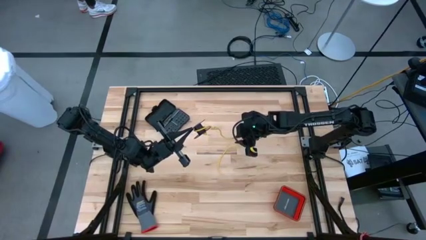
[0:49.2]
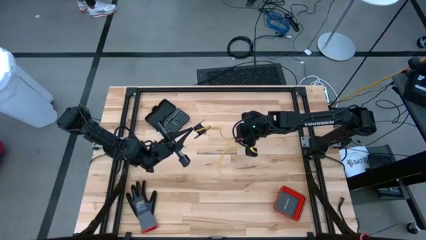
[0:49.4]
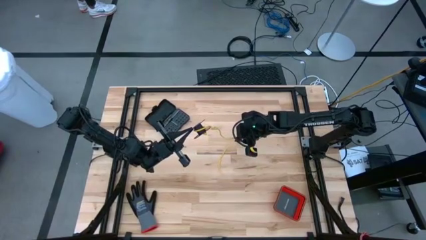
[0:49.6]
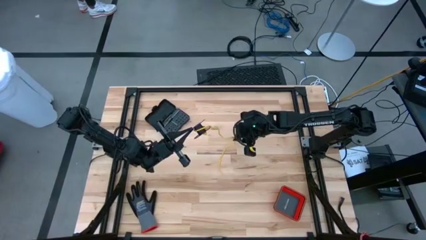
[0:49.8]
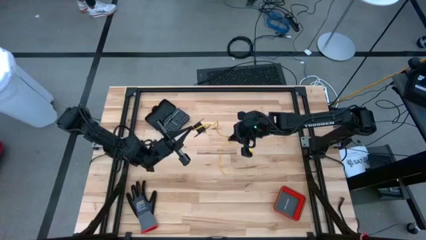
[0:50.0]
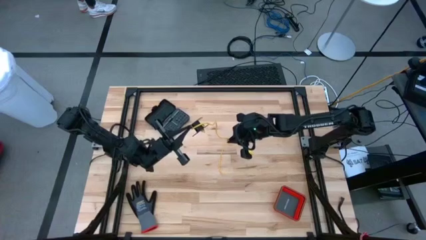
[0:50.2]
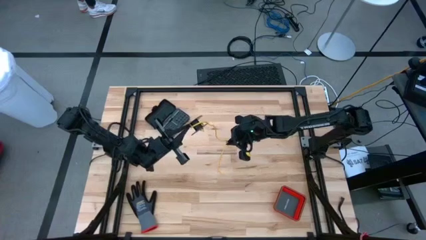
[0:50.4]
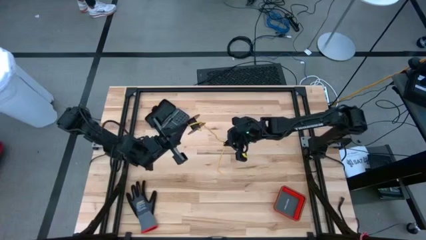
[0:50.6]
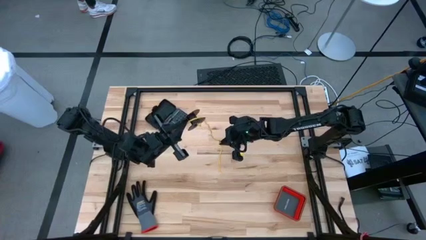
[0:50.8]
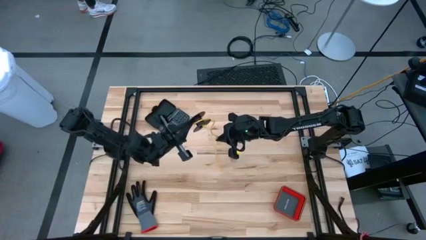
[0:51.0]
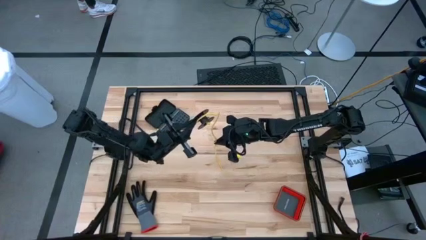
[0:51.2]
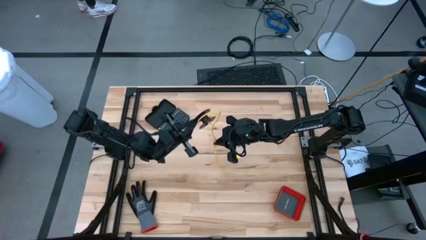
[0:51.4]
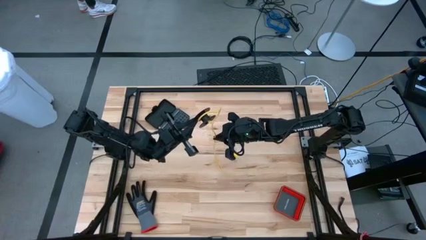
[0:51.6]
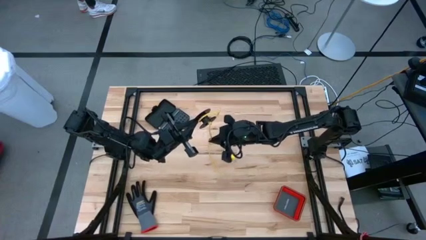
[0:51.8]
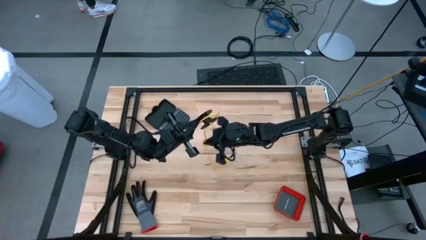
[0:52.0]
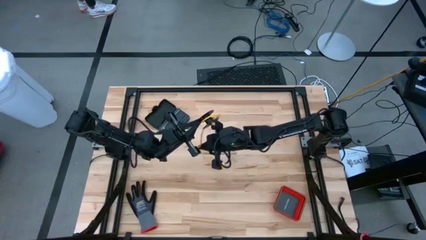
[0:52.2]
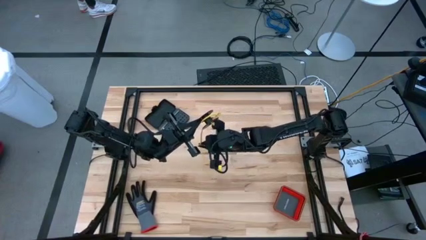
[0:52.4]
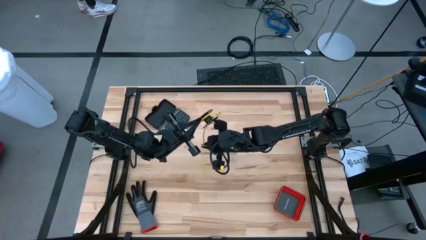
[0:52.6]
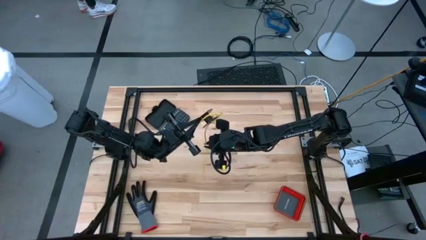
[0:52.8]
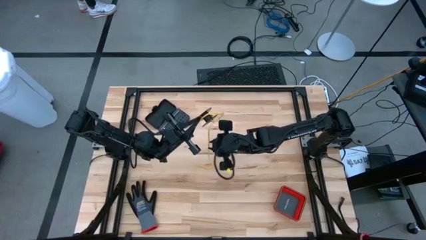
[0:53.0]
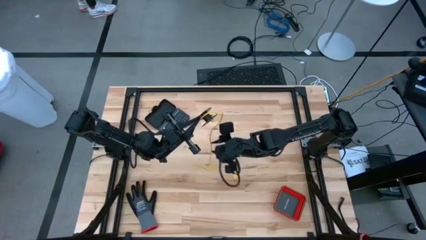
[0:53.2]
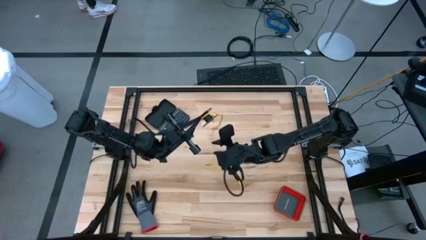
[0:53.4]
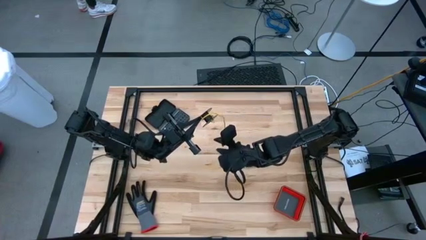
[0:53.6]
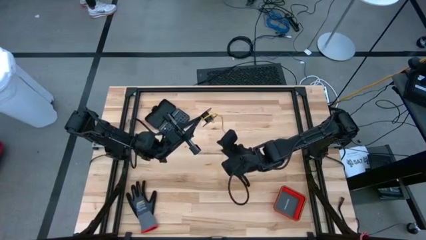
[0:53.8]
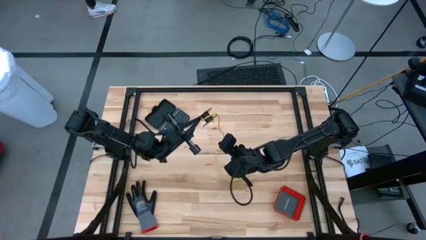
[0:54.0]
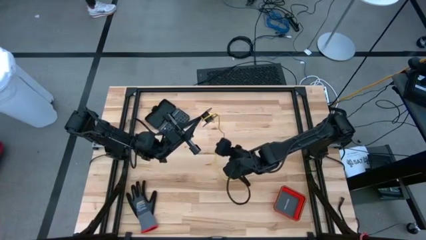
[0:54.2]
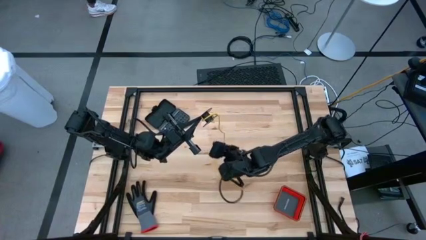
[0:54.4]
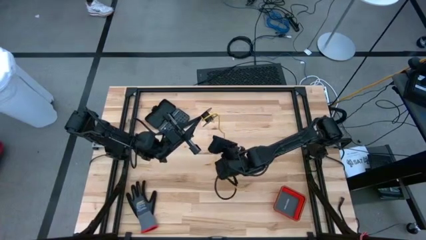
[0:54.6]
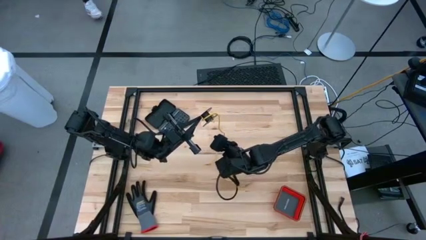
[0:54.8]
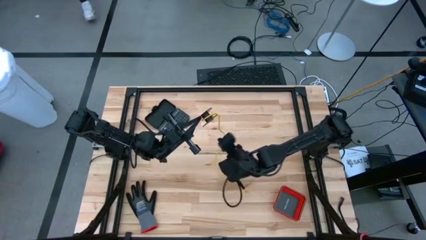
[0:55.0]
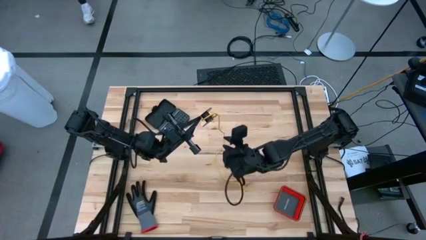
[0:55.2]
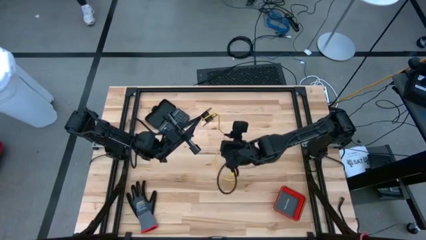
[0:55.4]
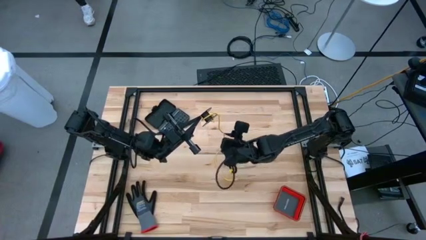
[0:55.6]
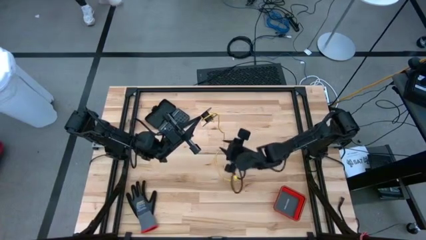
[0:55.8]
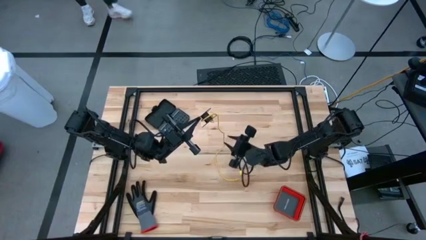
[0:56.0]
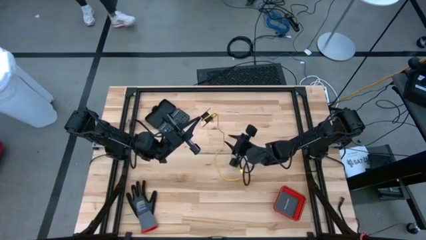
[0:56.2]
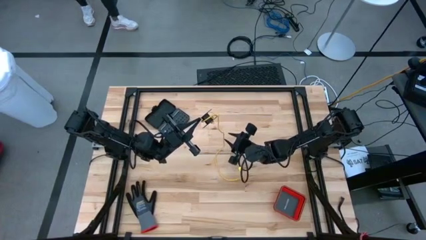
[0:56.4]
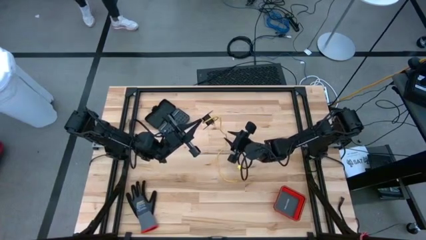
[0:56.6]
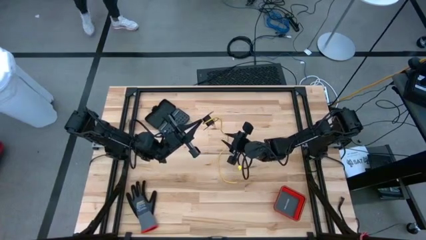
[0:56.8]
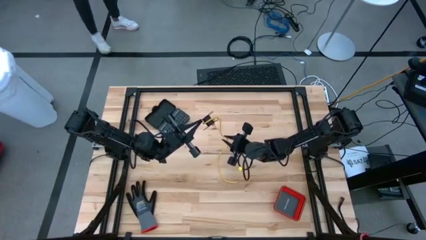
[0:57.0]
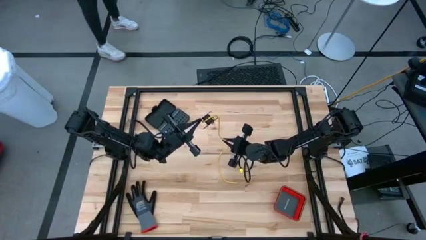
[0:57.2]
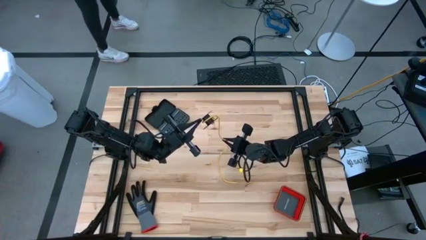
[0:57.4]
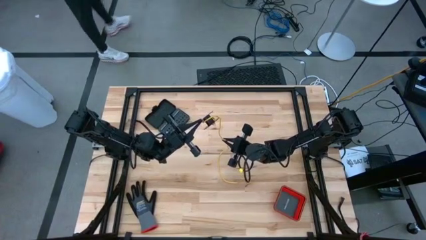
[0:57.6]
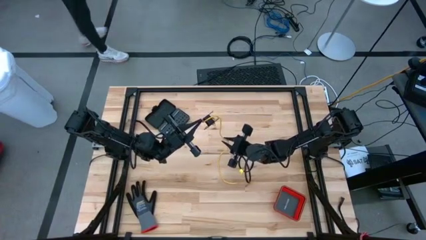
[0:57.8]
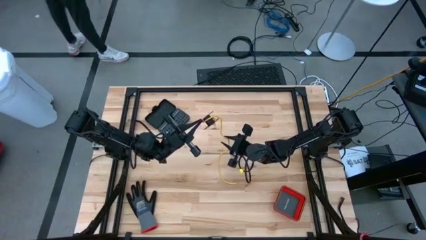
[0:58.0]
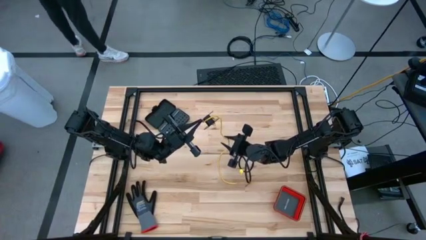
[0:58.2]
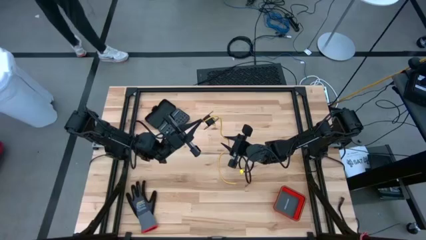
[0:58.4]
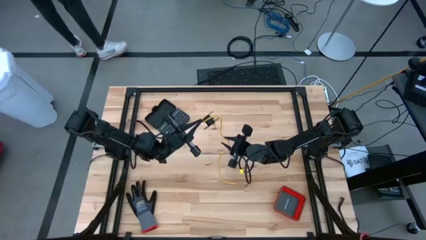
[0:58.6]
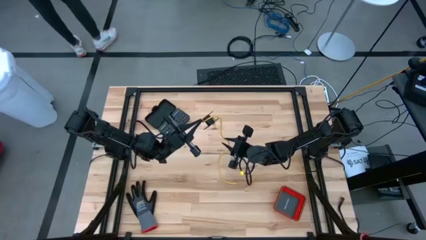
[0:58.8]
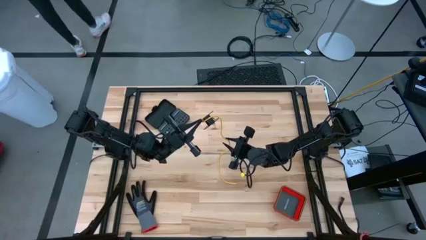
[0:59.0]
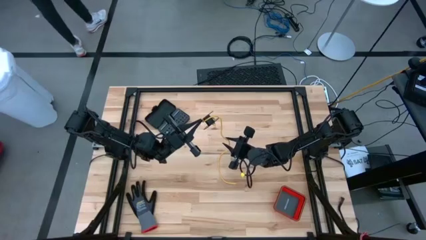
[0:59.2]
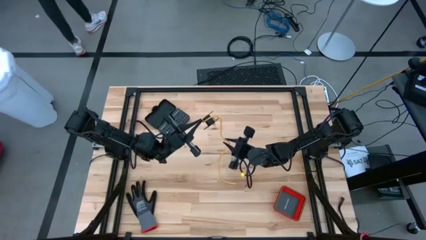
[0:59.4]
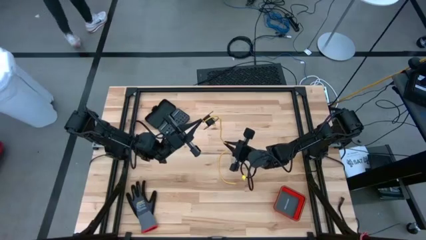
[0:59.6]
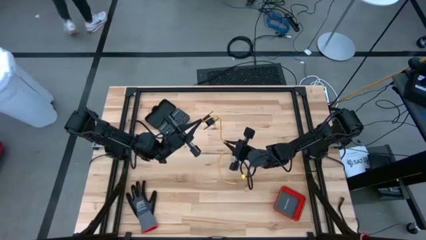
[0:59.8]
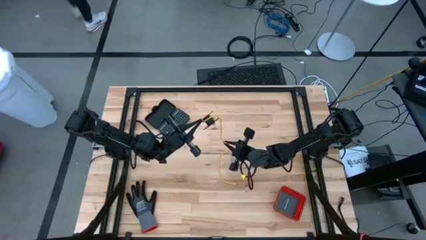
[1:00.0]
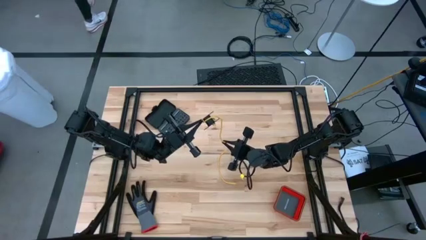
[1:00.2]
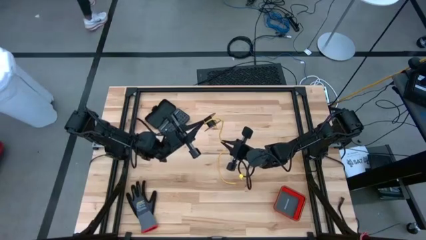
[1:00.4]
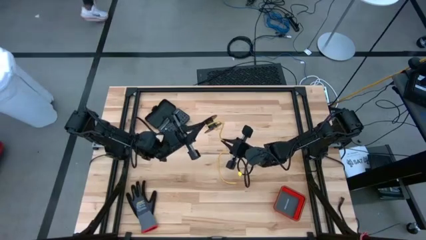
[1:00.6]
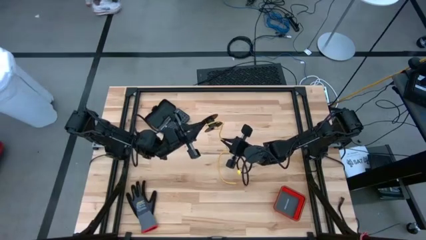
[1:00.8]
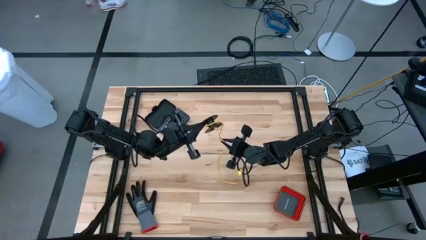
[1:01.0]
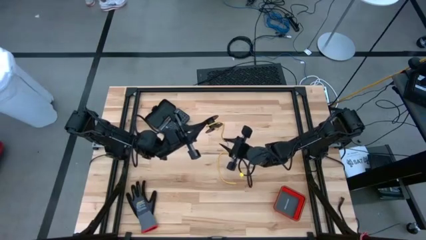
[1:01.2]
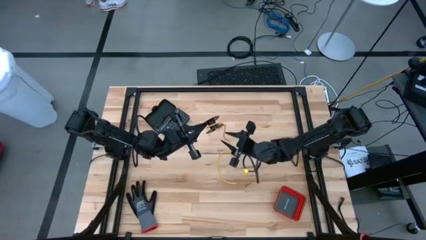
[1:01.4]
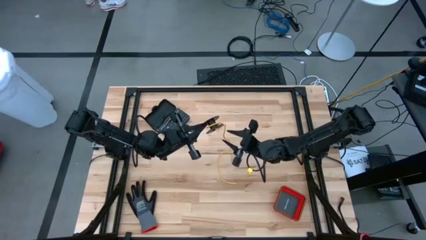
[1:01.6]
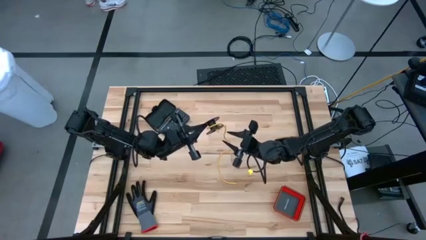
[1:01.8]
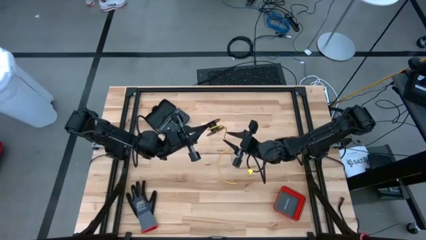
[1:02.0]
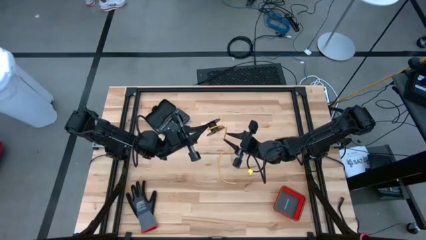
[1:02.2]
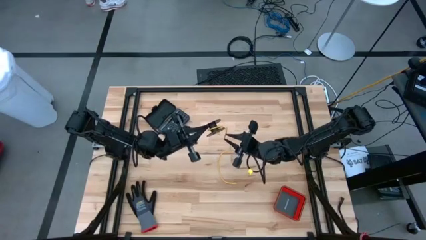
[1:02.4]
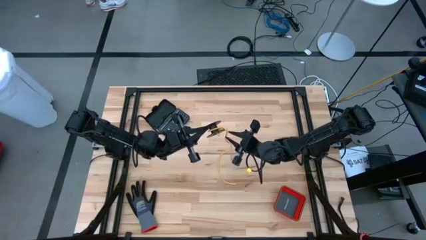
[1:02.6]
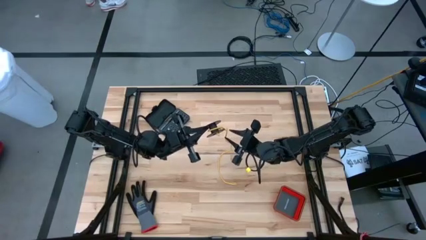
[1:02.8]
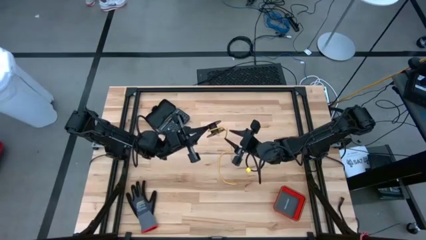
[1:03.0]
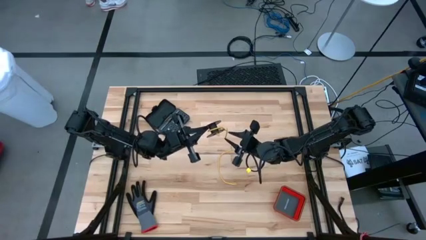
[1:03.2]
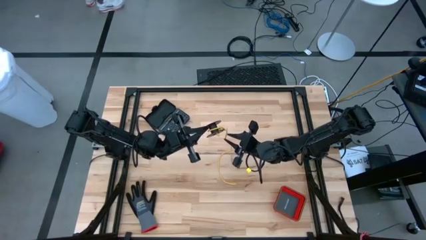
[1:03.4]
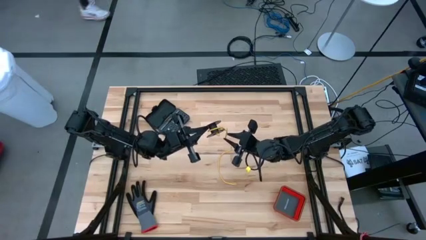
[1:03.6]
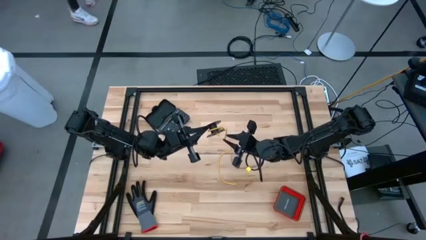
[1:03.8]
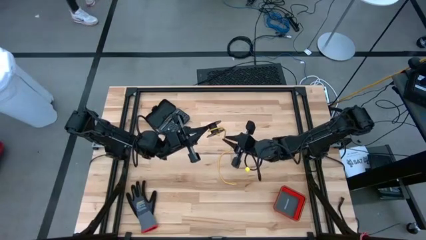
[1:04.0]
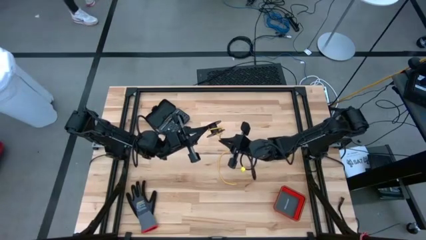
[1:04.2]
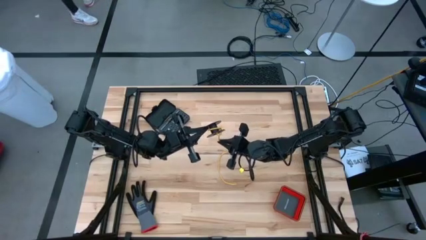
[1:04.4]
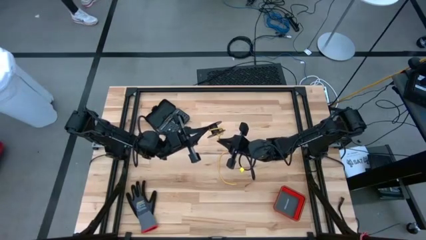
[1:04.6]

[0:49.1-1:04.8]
Task: Coil cords
Coil the yellow wire onto the spool
